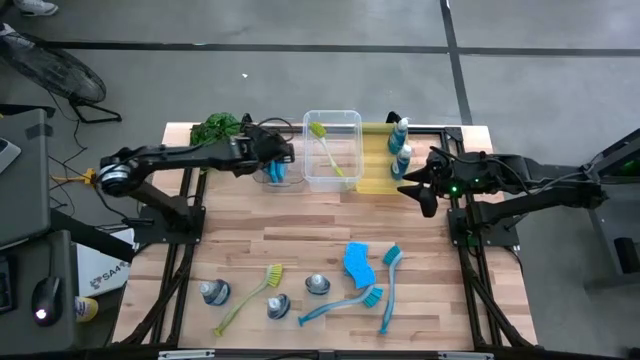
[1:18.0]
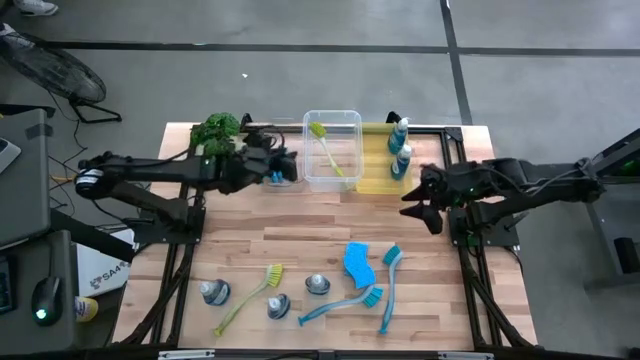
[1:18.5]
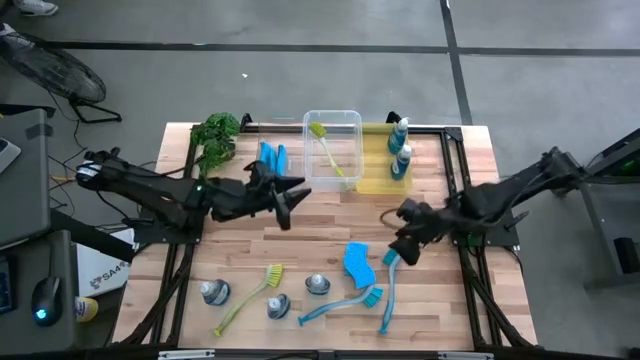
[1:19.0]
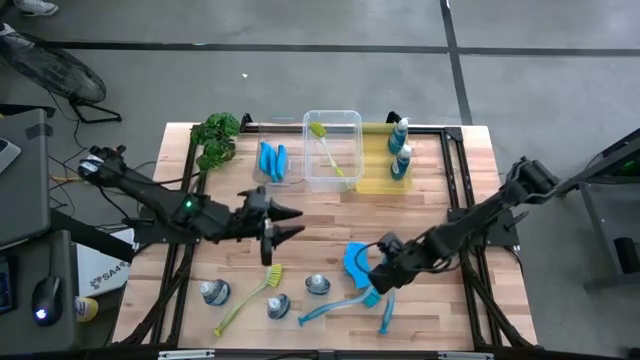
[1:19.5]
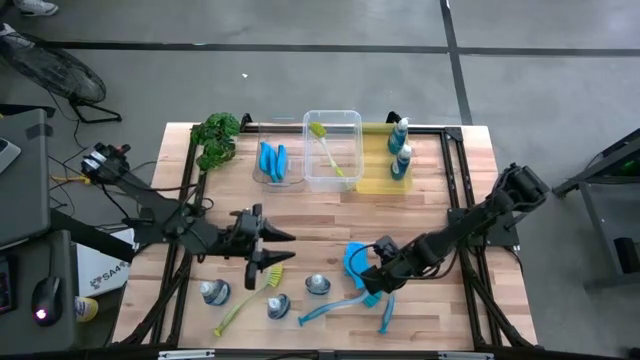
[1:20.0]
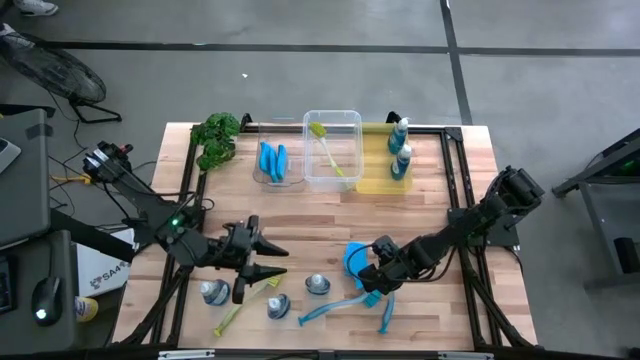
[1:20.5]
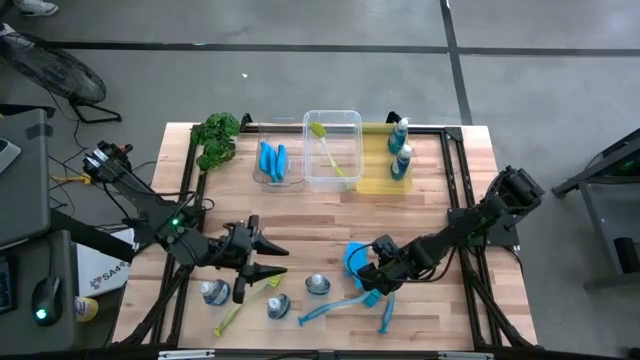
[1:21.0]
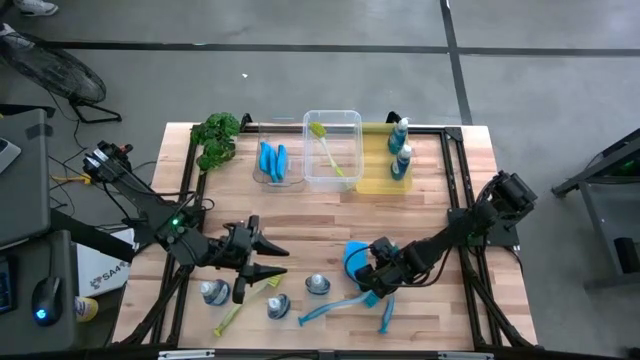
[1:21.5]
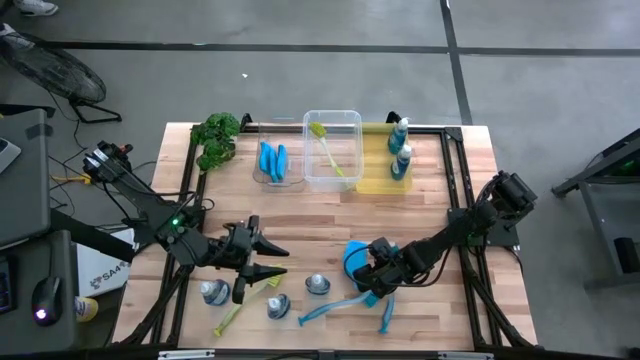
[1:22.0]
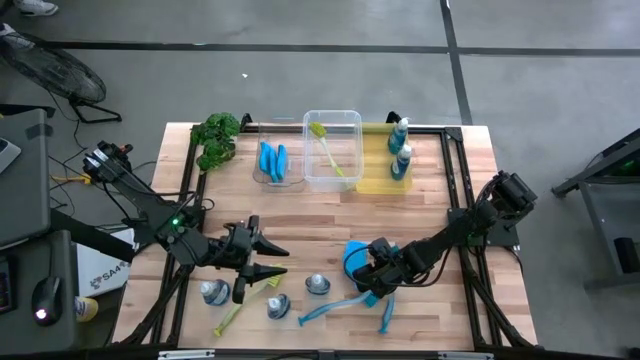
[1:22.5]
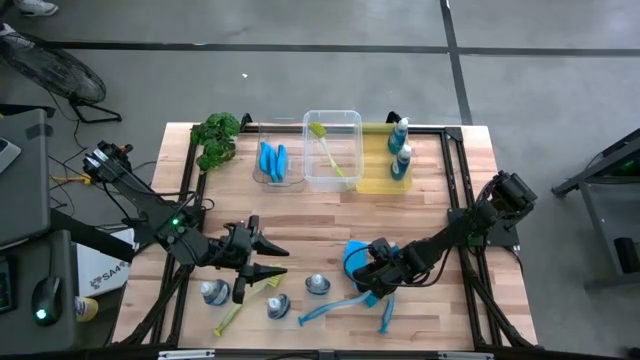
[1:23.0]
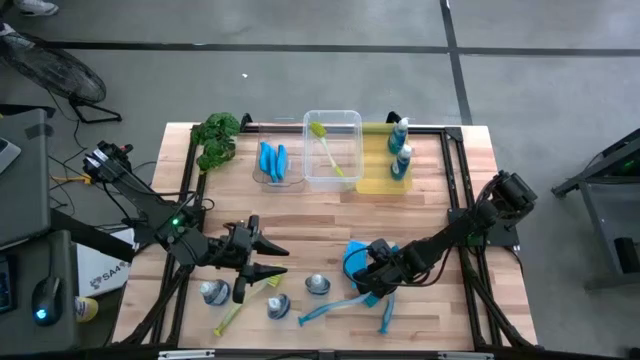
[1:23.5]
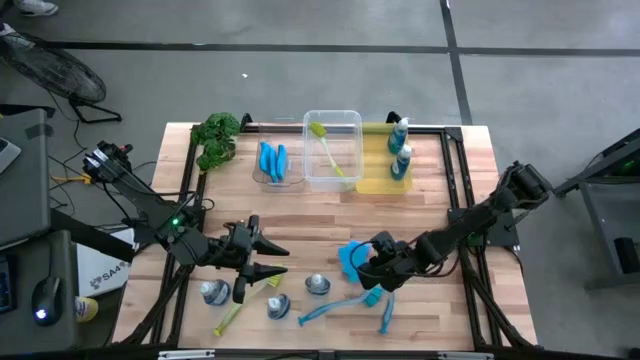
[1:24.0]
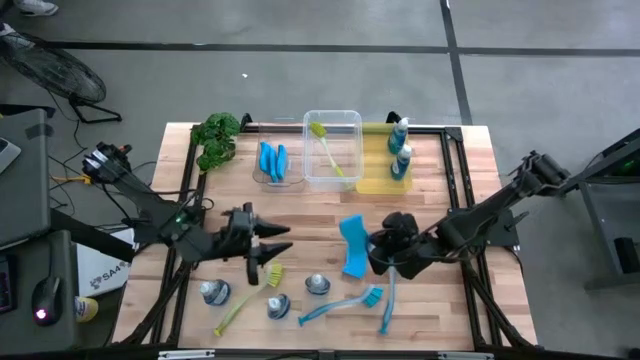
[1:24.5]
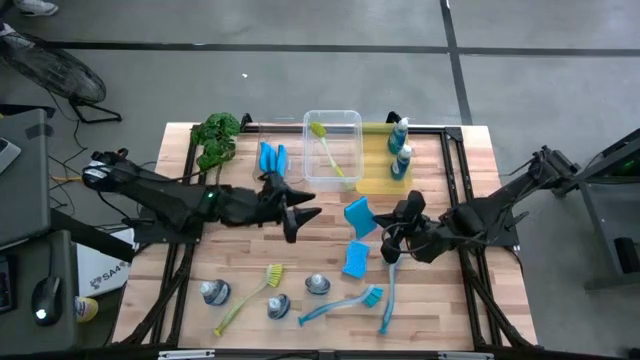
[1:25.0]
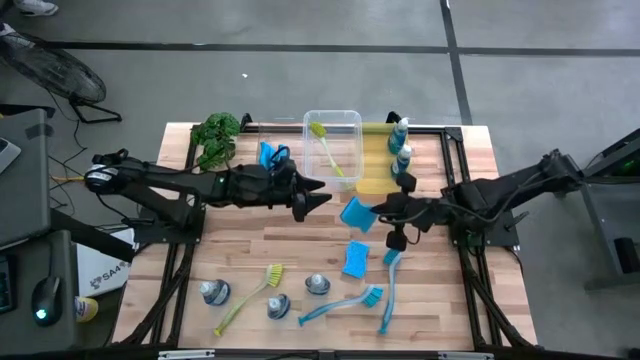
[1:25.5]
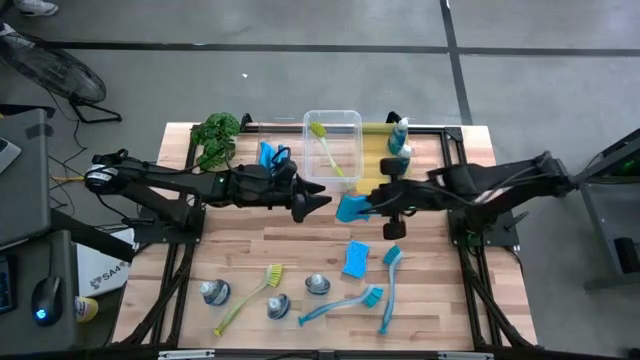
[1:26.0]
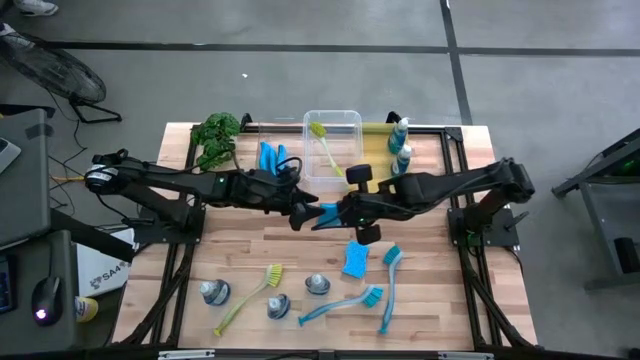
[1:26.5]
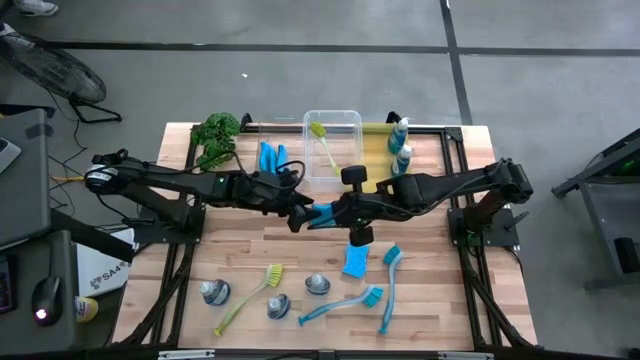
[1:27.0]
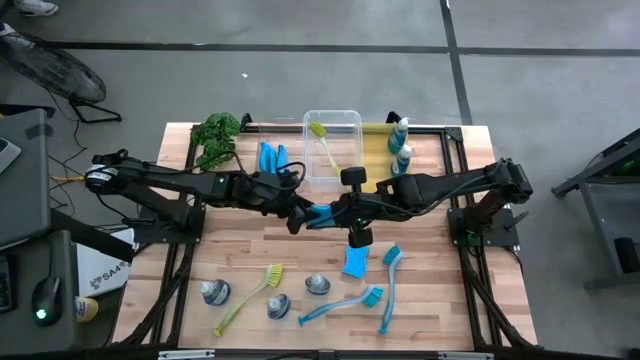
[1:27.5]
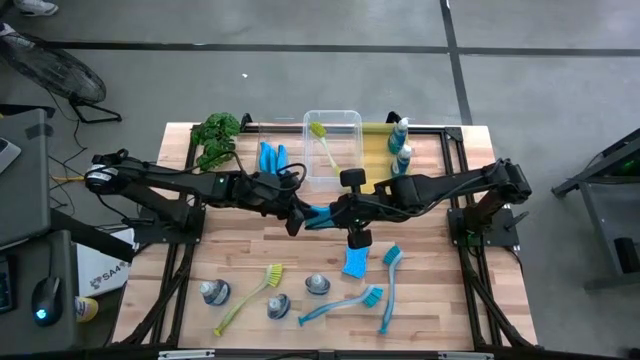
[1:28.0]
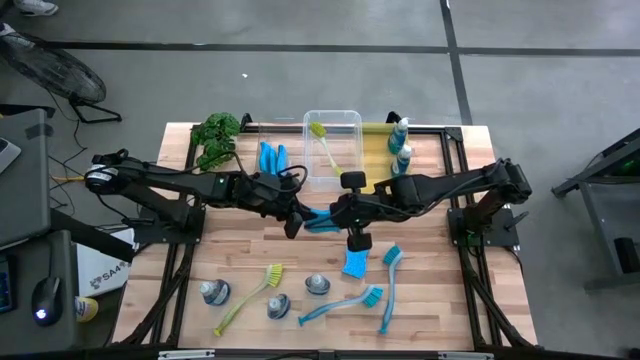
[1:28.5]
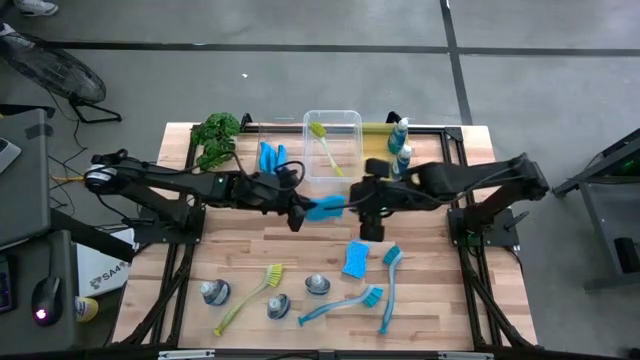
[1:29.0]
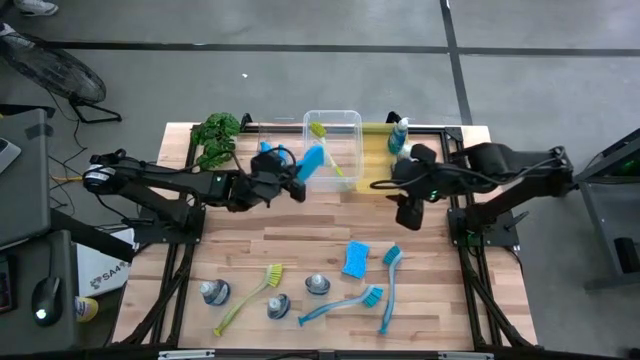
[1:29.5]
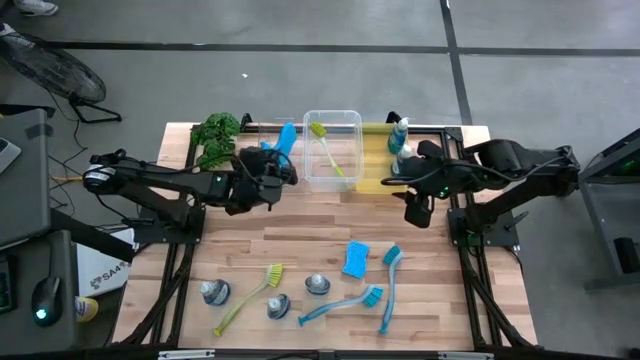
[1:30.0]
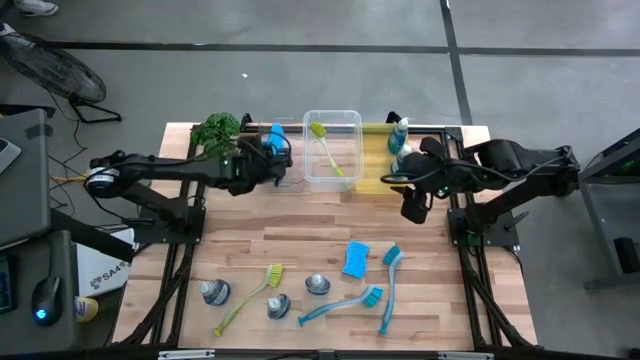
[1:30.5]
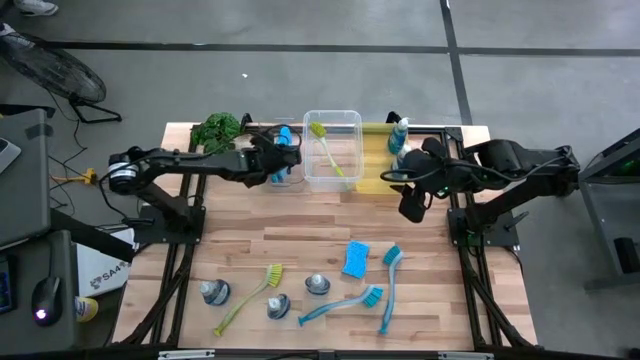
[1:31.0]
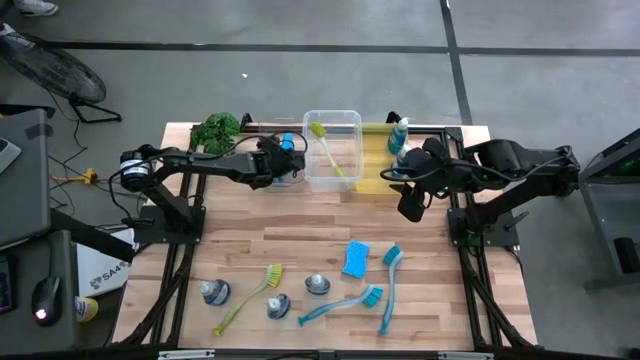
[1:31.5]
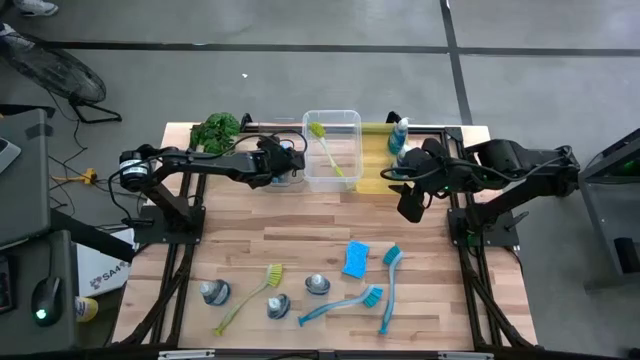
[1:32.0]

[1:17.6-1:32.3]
Task: Pick & Place Kitchen Sink Supplies
Put the sponge into the transparent bin

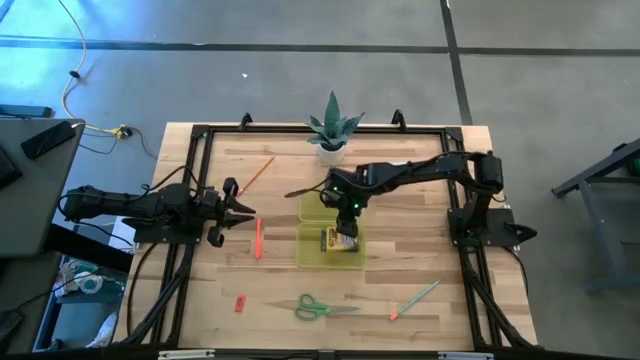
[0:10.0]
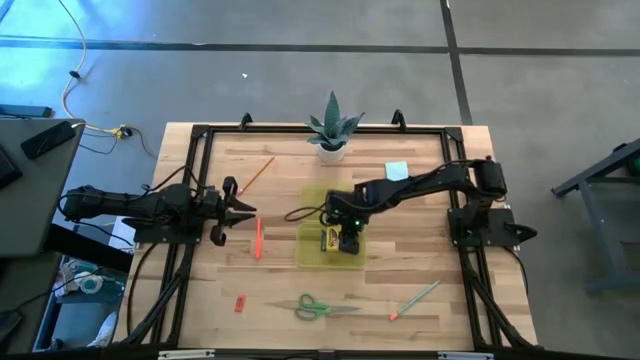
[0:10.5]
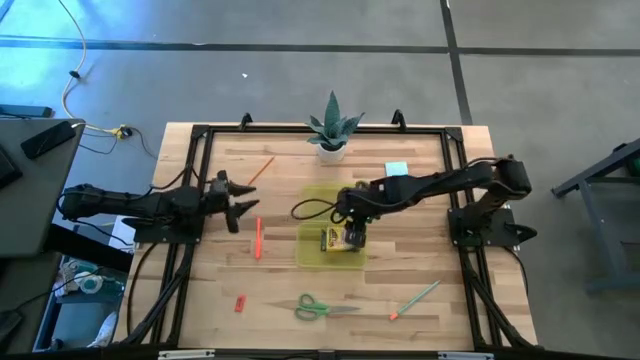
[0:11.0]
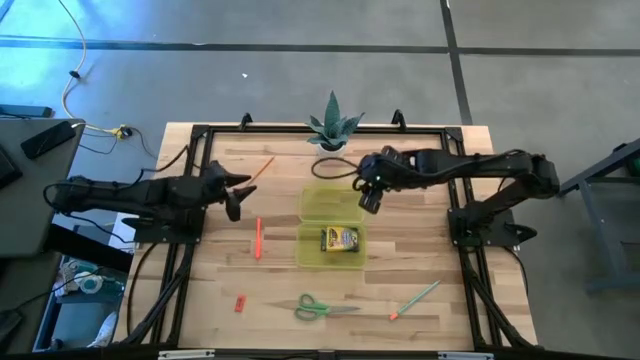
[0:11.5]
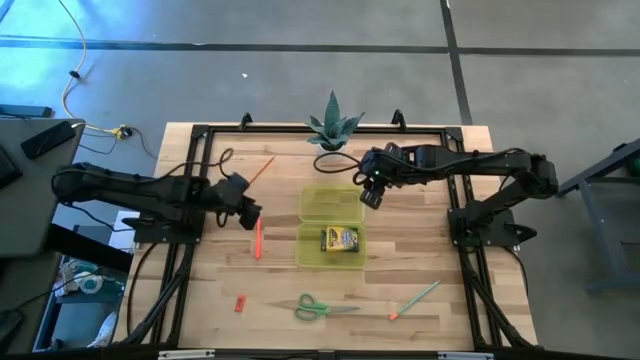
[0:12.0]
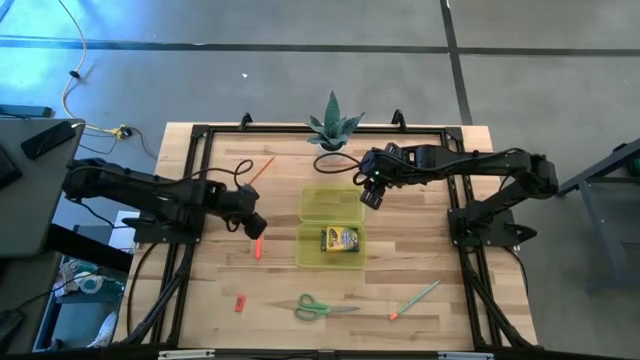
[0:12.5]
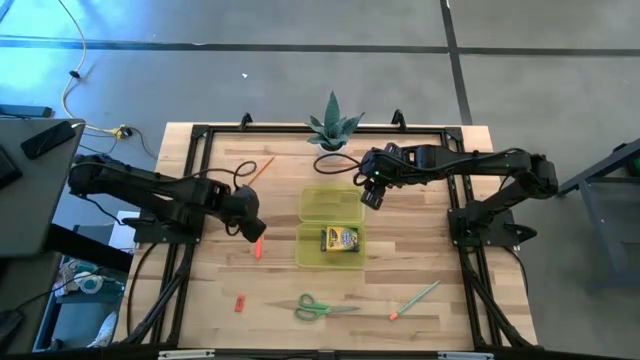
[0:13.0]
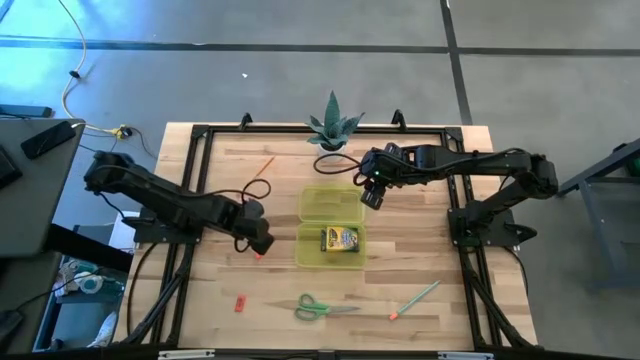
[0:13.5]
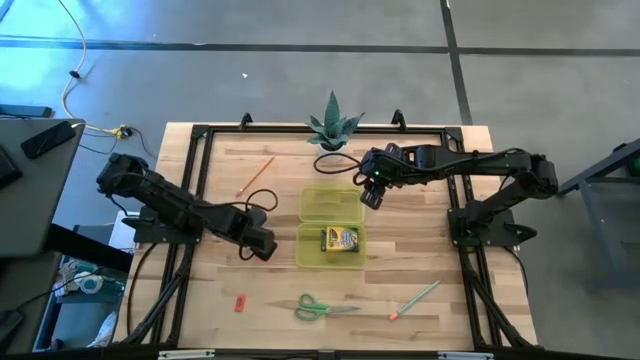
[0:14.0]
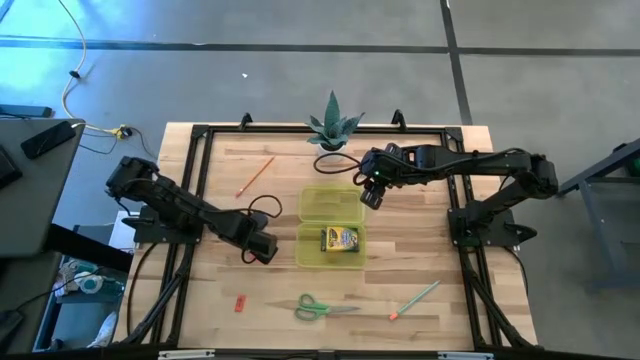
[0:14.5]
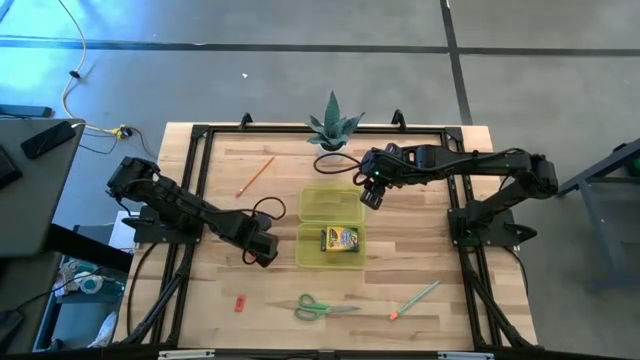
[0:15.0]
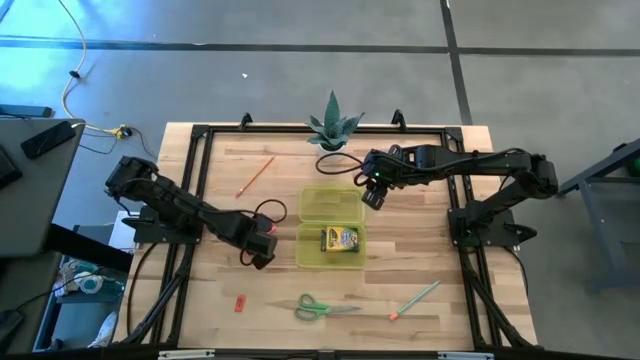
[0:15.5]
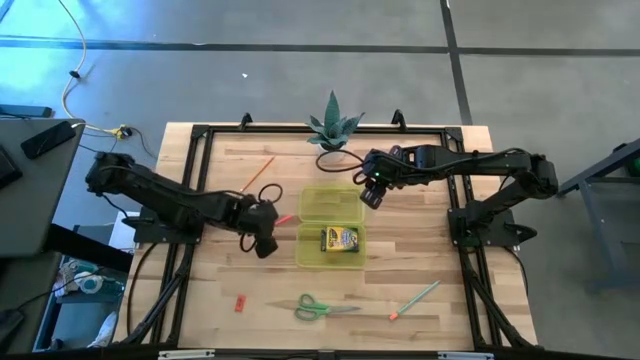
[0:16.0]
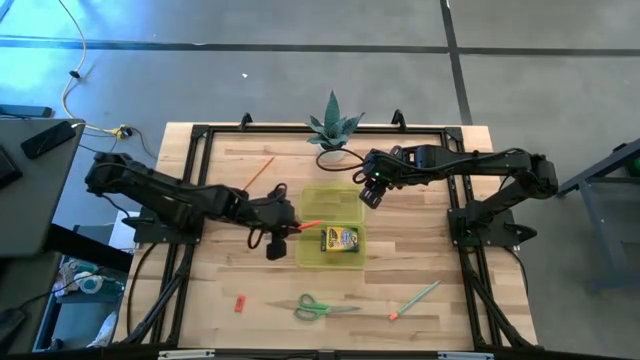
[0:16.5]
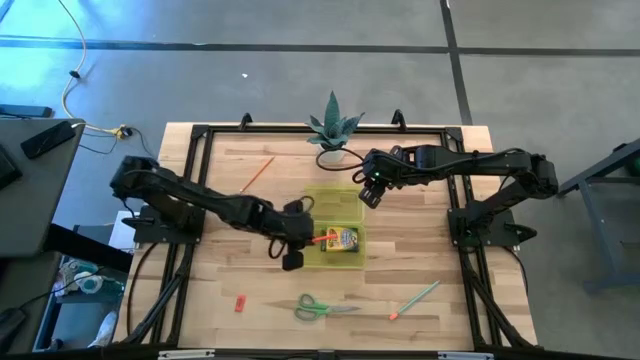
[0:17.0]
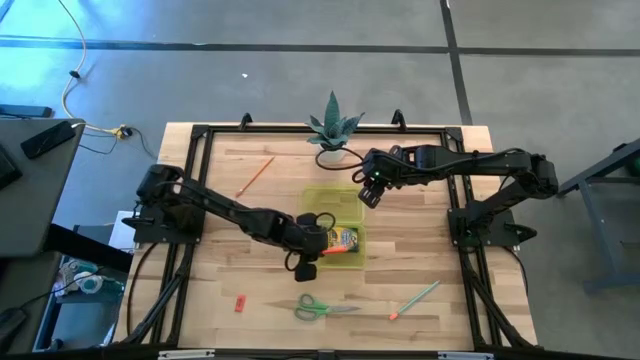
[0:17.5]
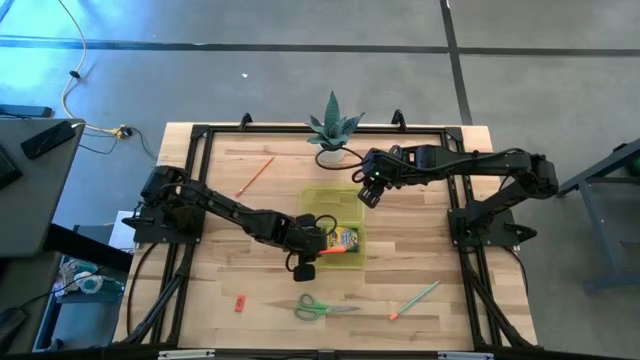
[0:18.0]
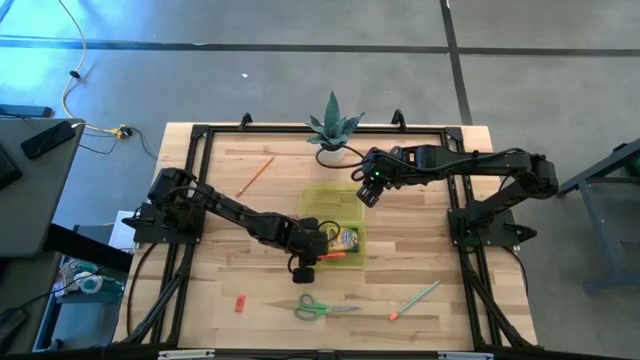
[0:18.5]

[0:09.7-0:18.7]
Task: Pack school essentials
Put the orange ball pen into the yellow school supply box
